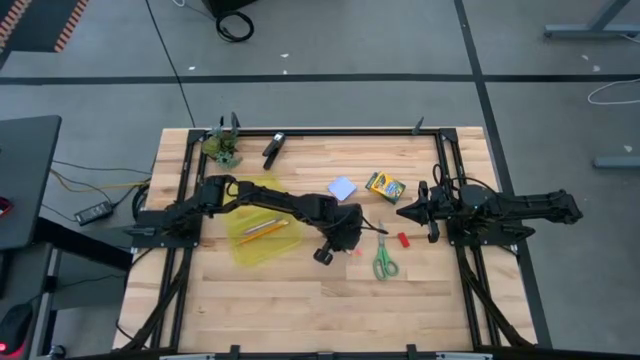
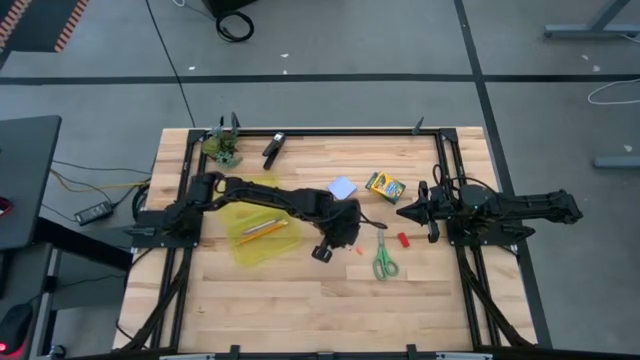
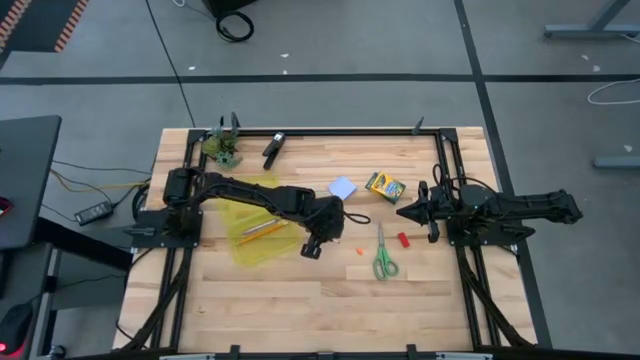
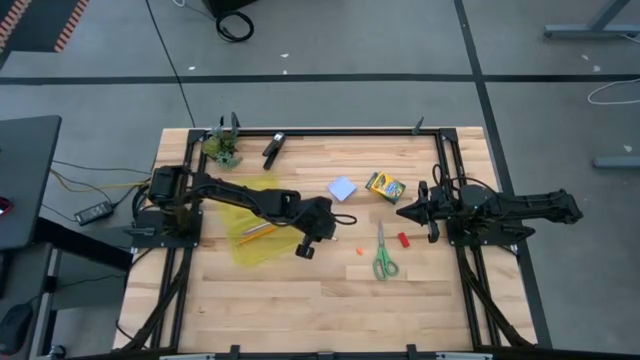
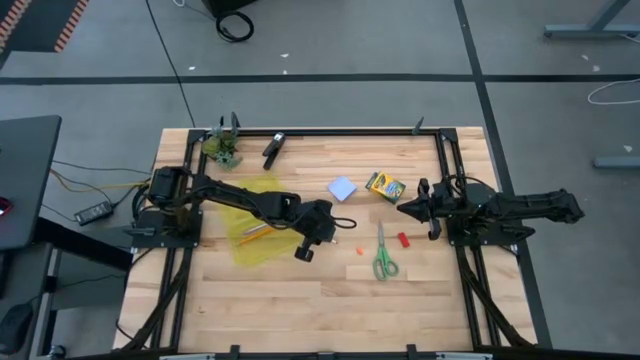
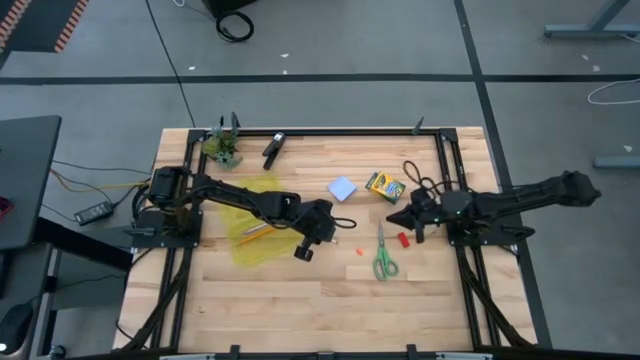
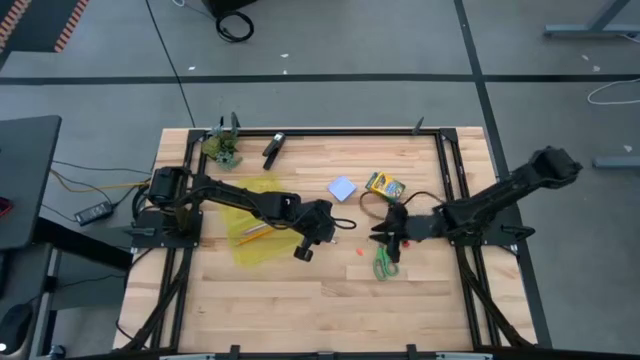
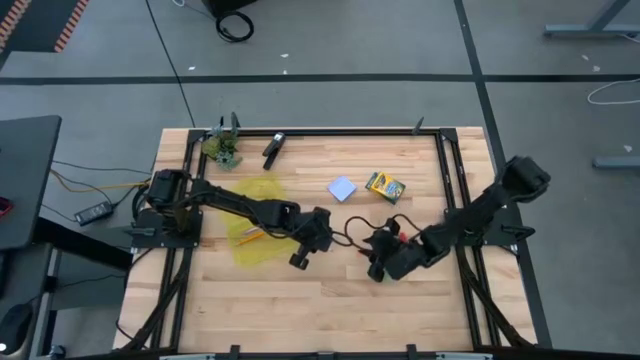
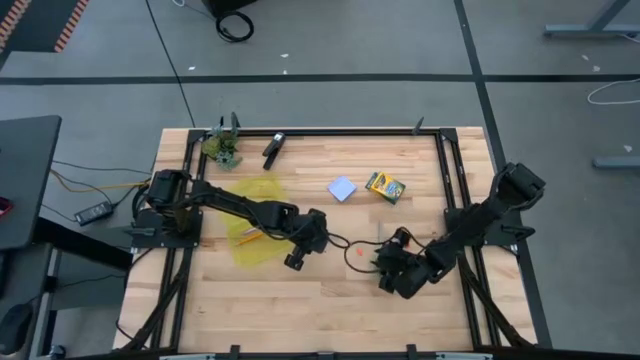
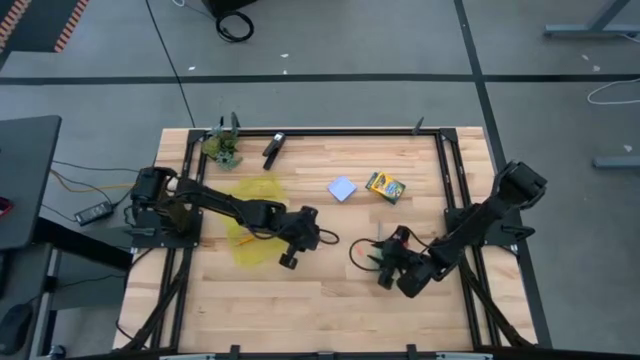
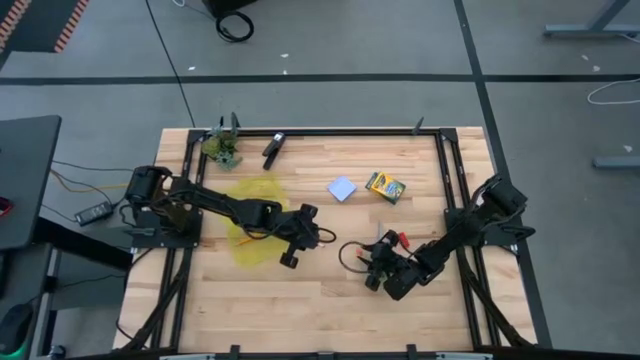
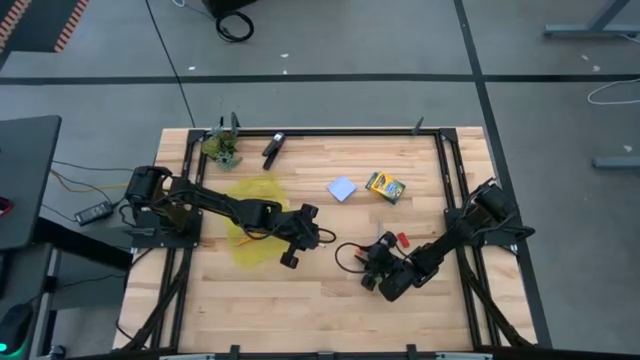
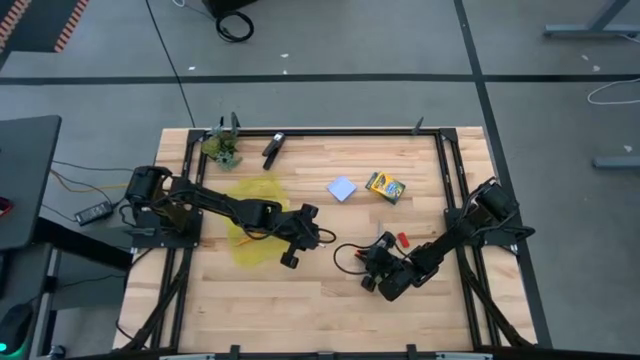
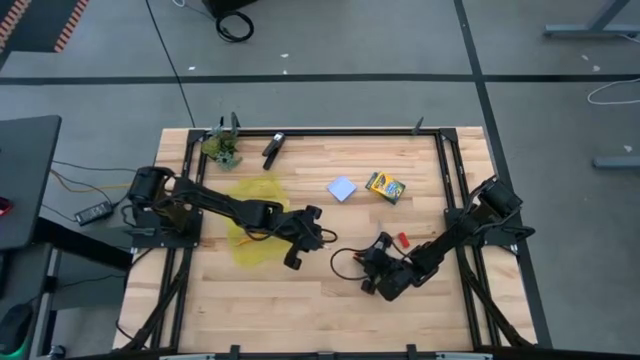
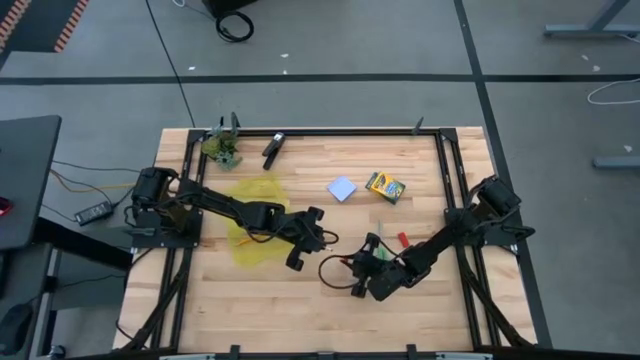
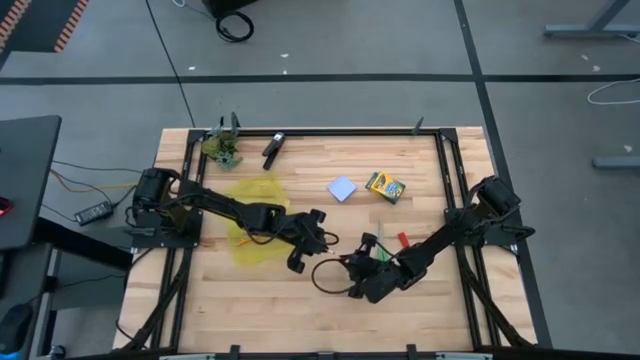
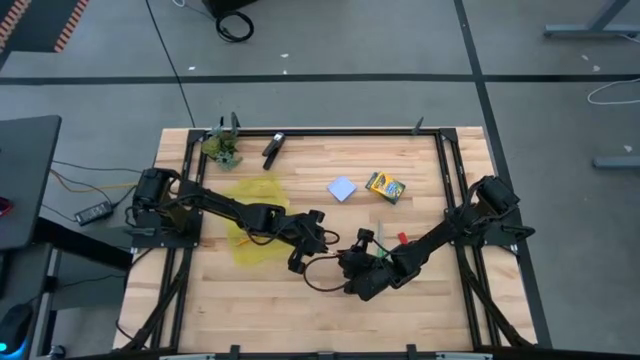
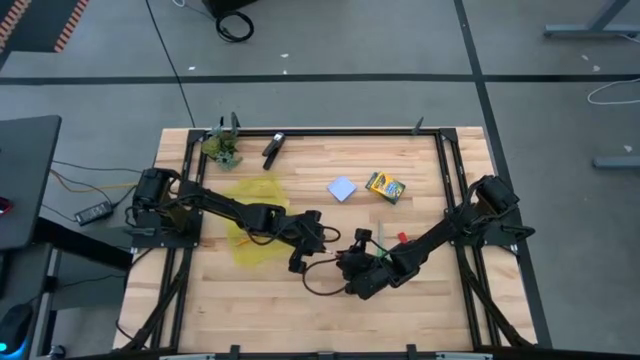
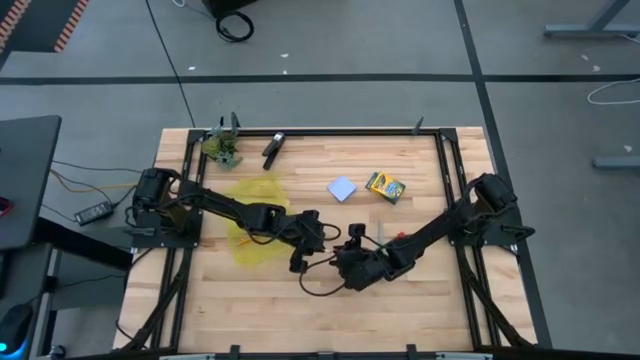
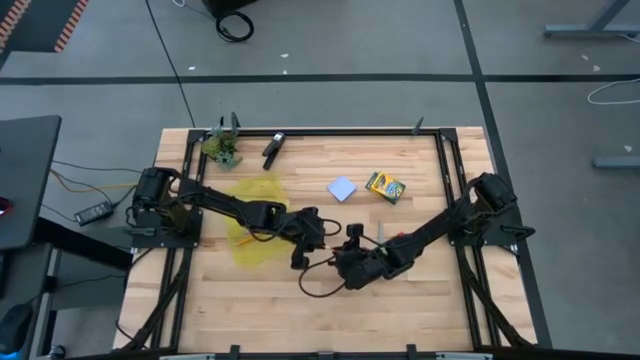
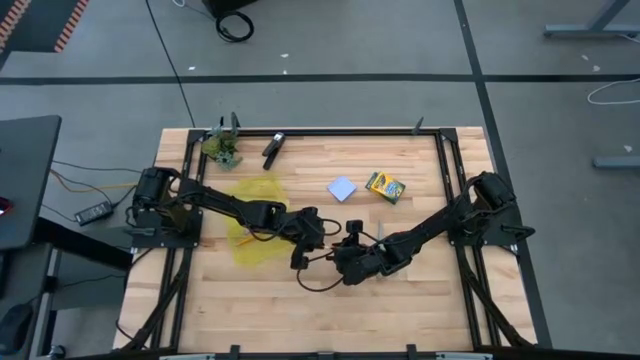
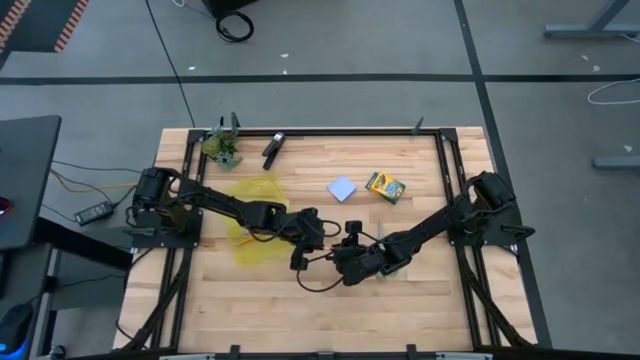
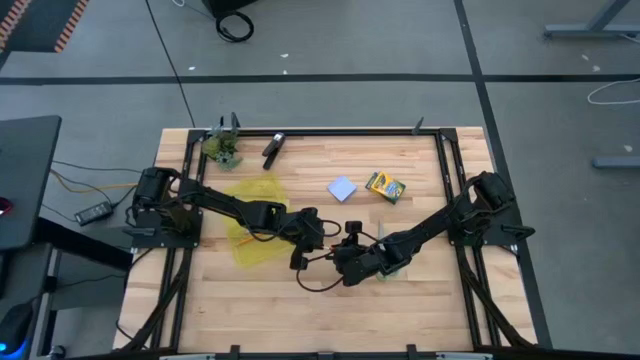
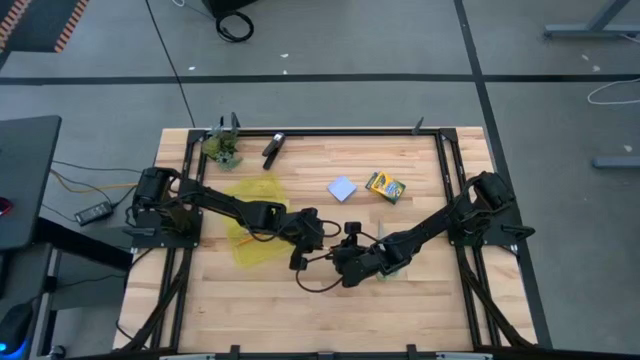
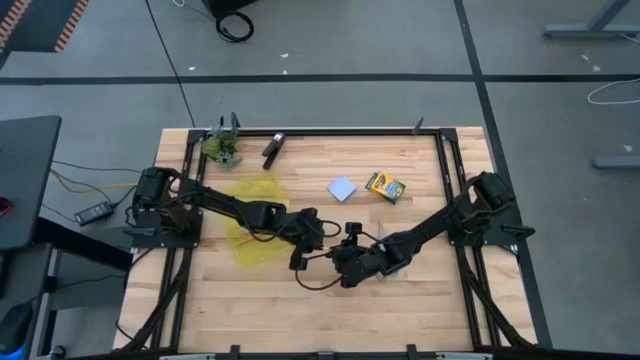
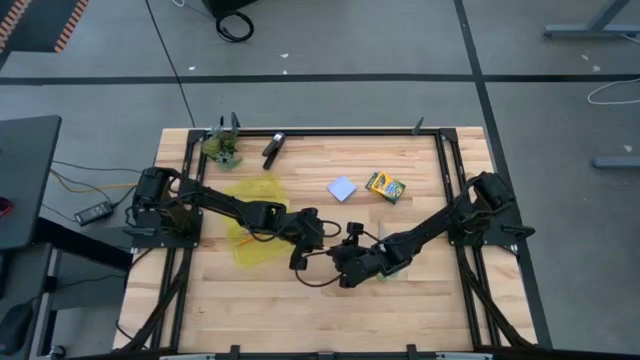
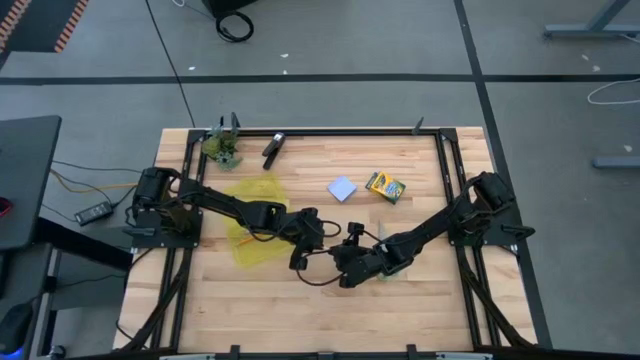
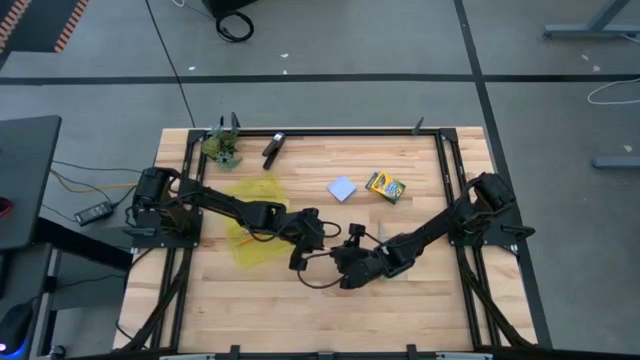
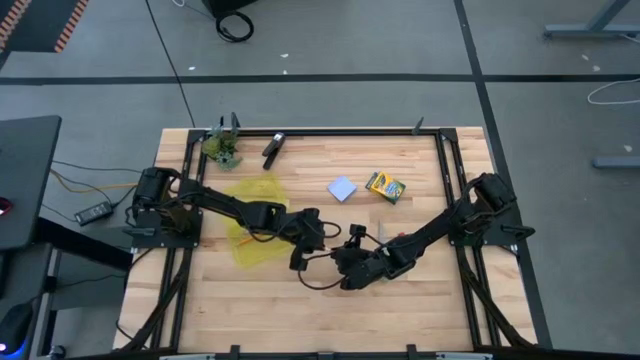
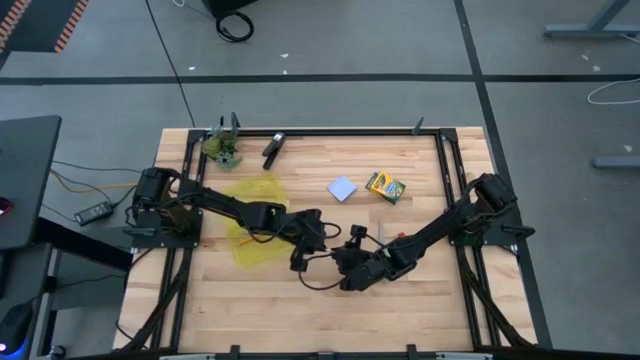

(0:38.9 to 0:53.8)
Task: Pack school essentials
Put the orange pencil into the yellow supply box

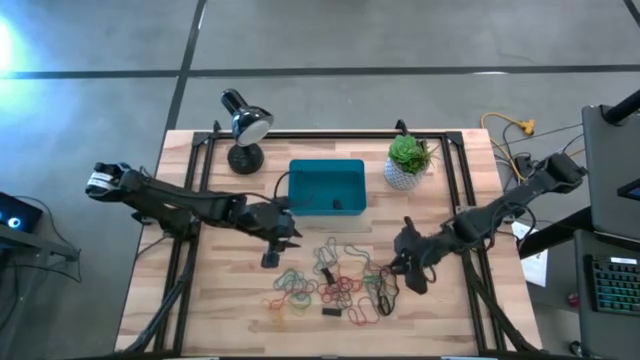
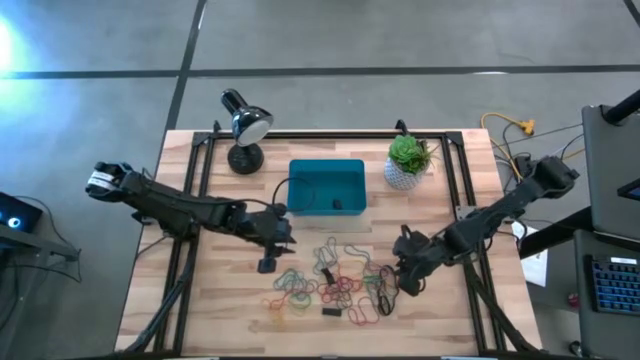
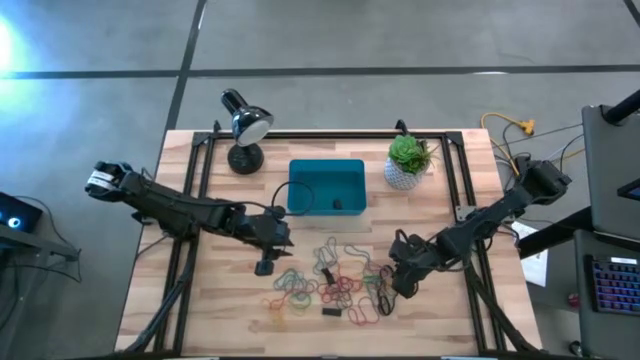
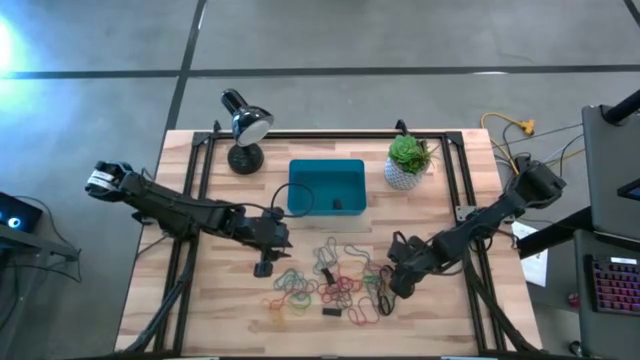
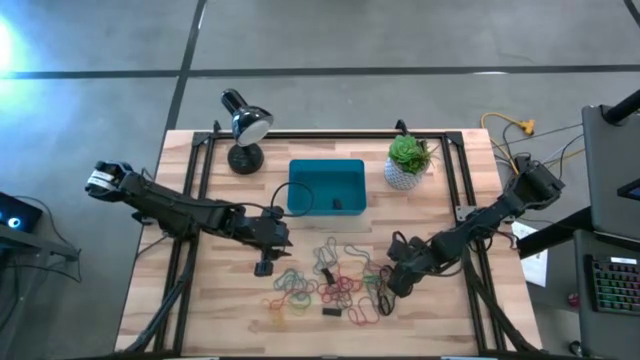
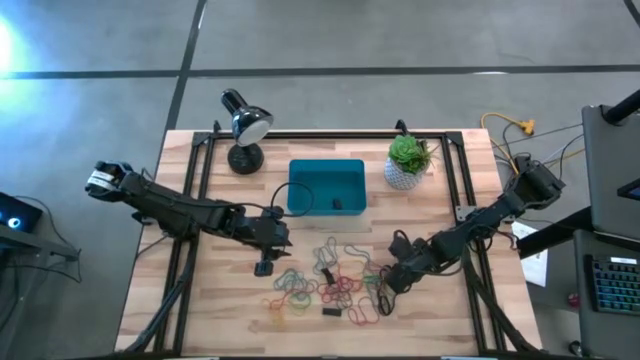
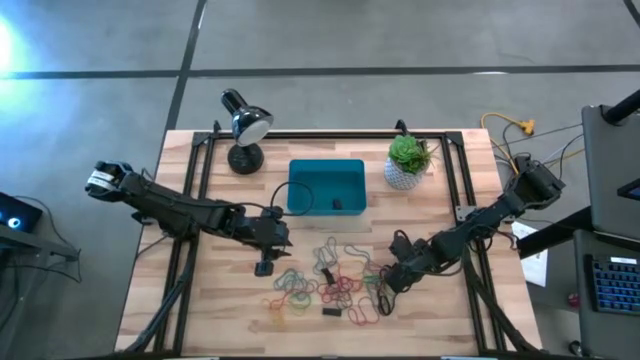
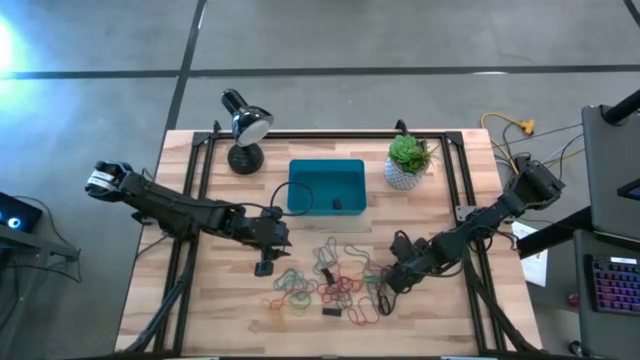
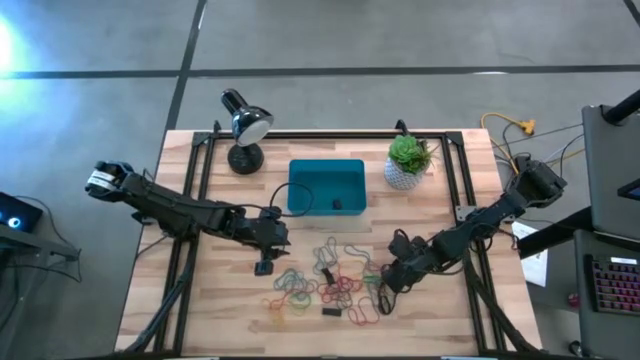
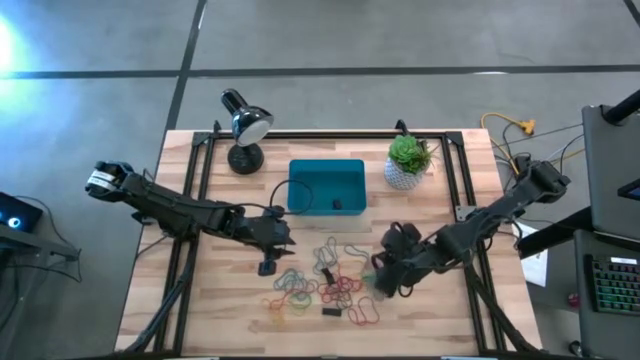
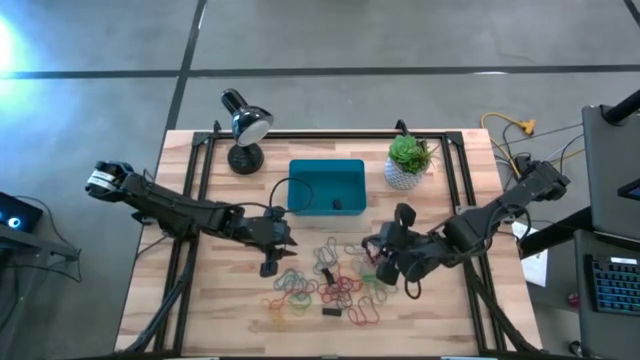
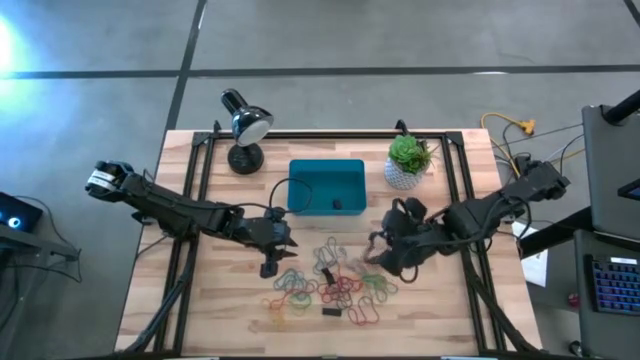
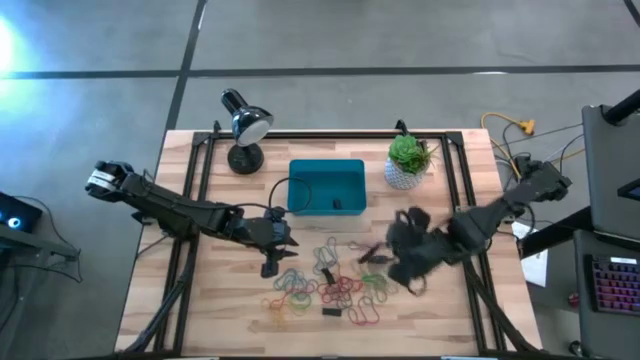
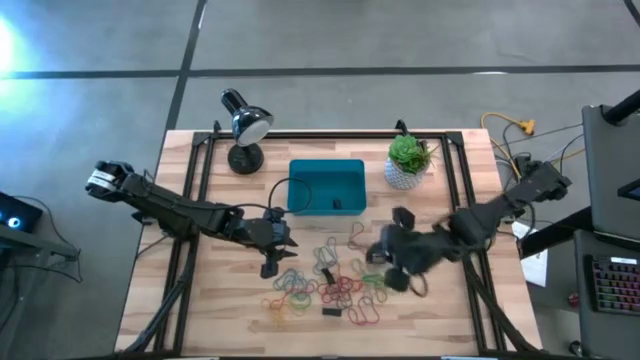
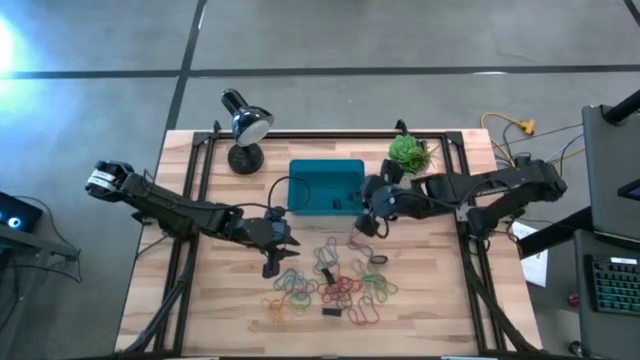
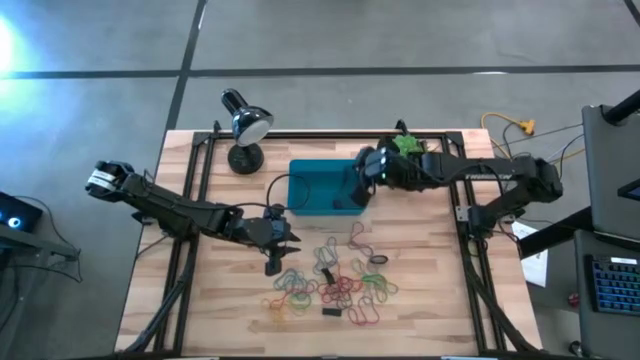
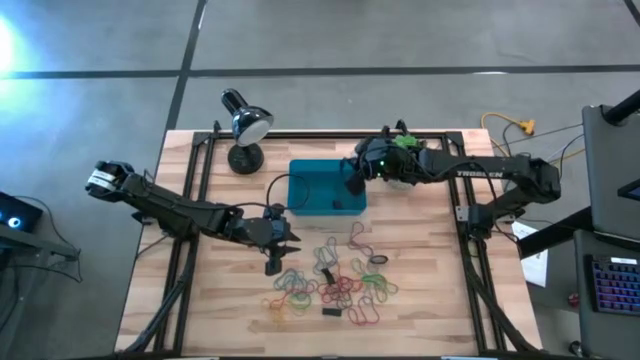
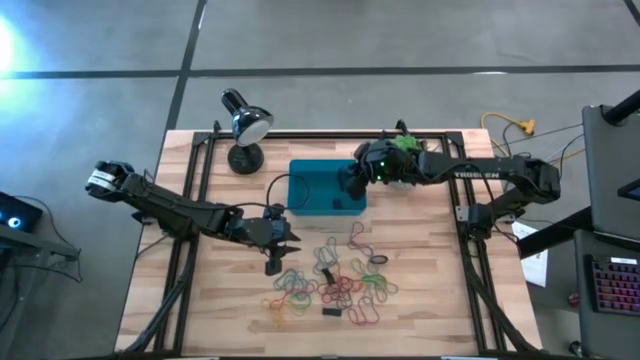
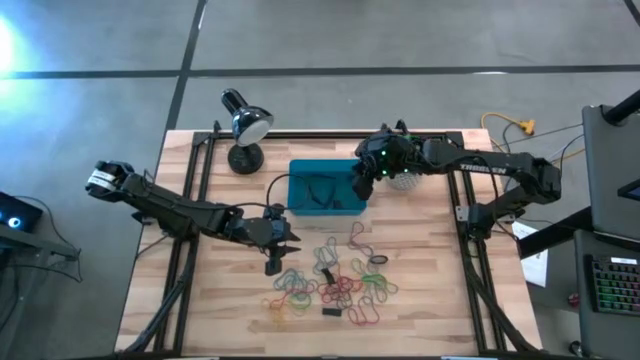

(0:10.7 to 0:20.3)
Task: Pick and place rubber bands into bin
Put the black rubber band into the dark blue bin
